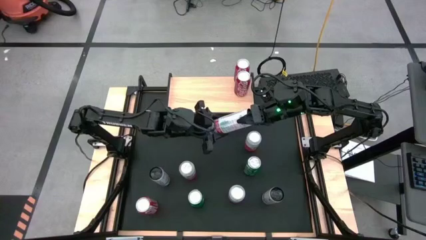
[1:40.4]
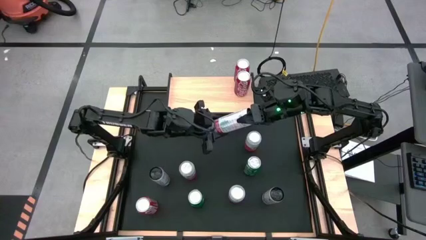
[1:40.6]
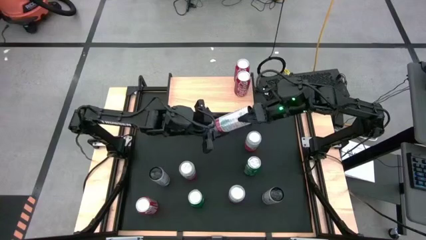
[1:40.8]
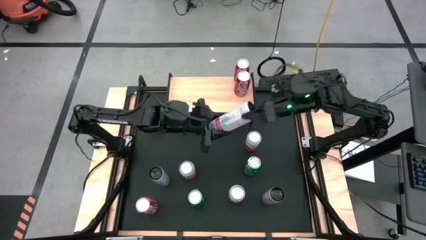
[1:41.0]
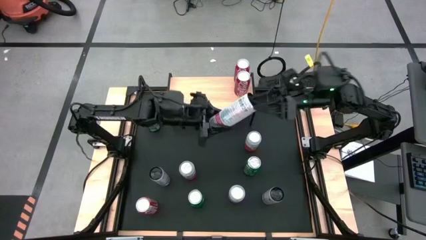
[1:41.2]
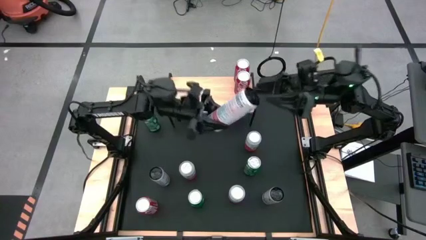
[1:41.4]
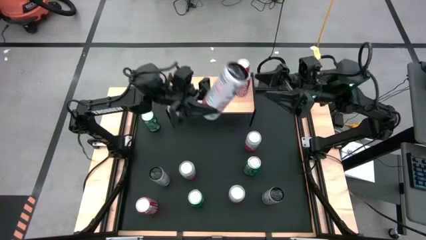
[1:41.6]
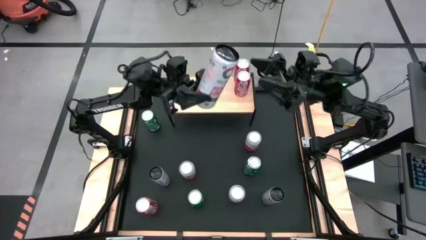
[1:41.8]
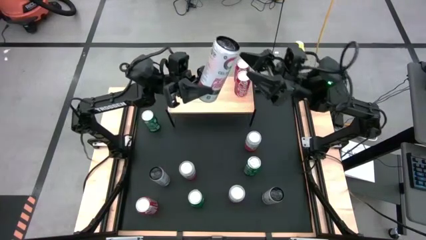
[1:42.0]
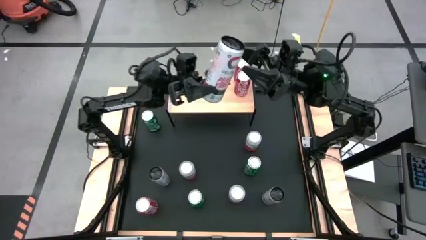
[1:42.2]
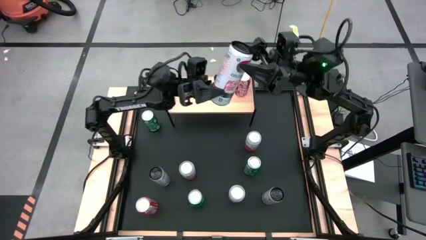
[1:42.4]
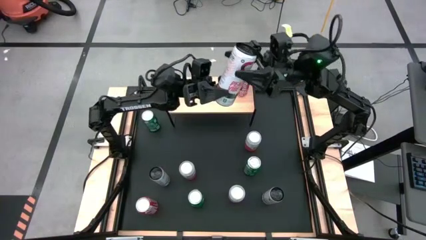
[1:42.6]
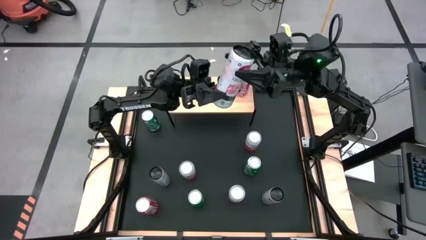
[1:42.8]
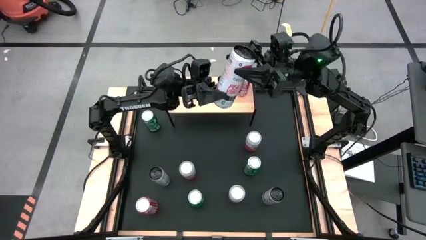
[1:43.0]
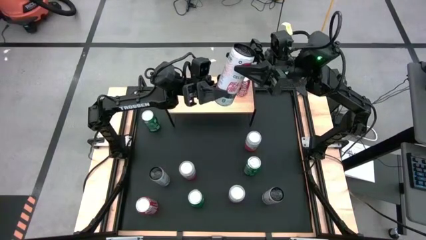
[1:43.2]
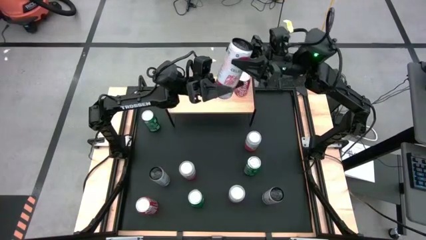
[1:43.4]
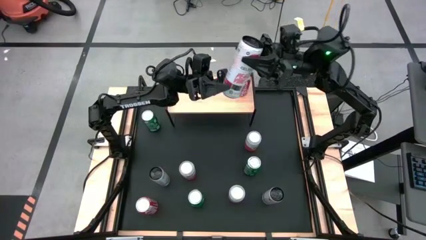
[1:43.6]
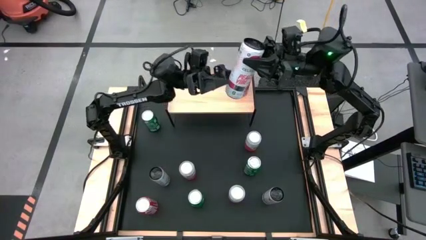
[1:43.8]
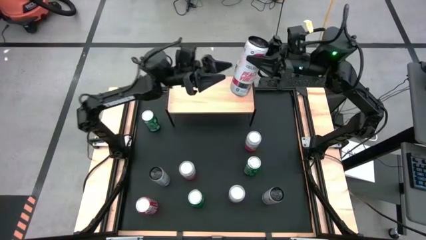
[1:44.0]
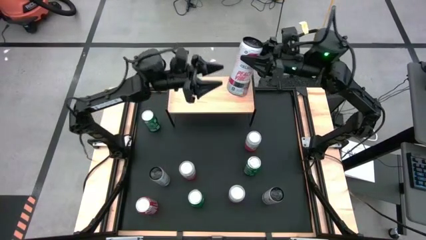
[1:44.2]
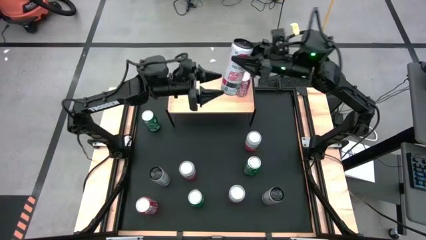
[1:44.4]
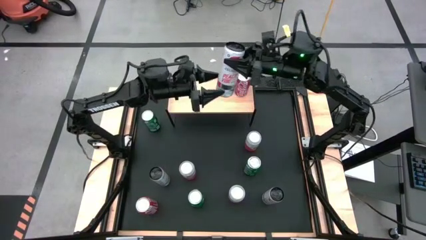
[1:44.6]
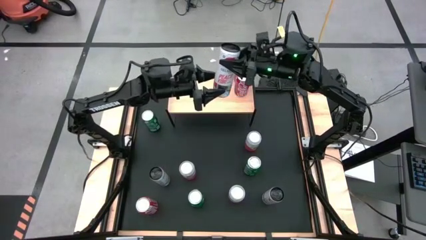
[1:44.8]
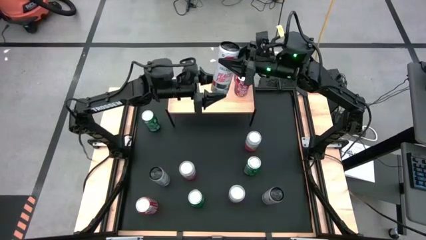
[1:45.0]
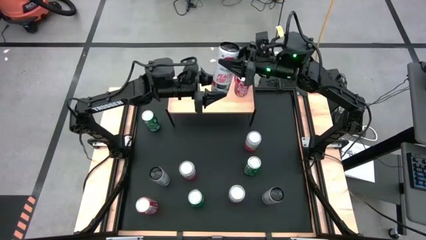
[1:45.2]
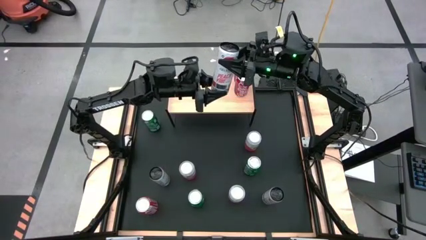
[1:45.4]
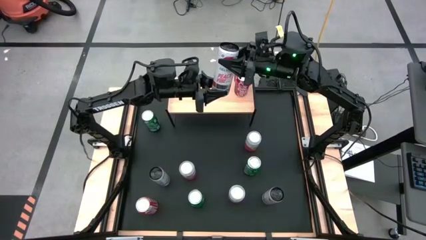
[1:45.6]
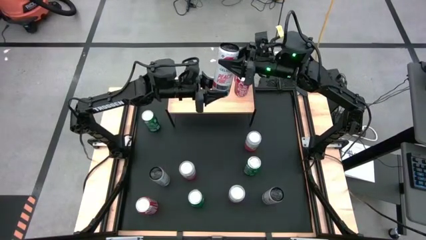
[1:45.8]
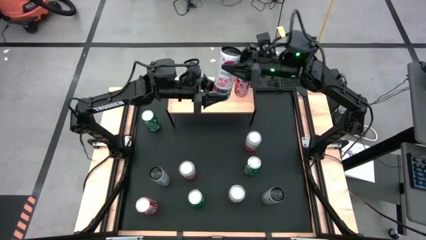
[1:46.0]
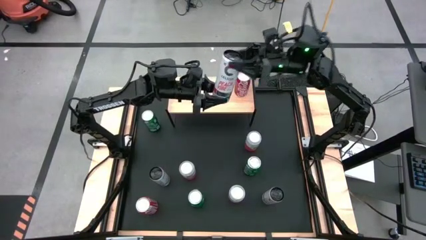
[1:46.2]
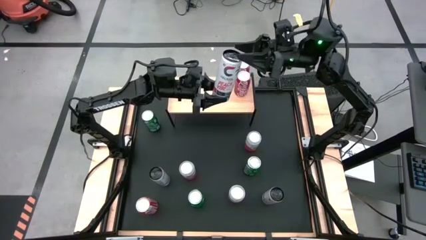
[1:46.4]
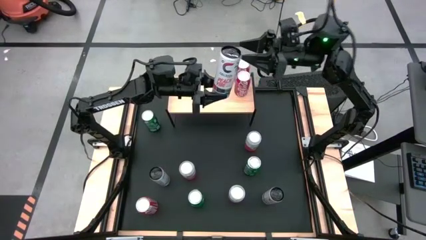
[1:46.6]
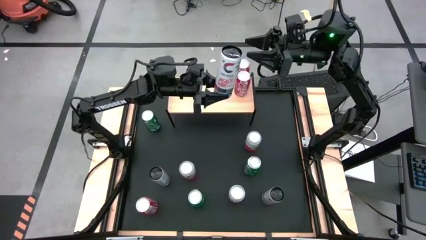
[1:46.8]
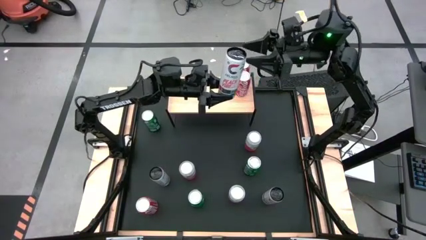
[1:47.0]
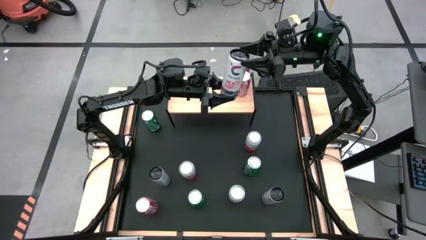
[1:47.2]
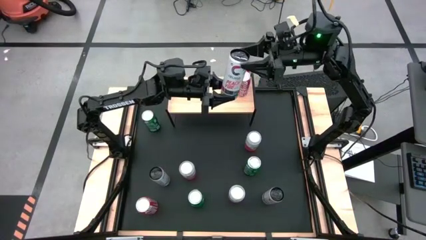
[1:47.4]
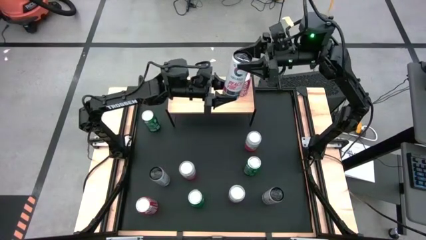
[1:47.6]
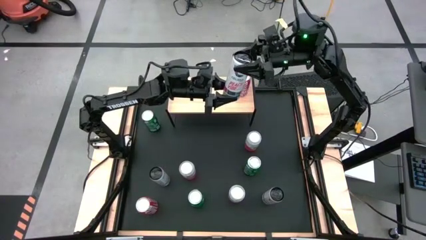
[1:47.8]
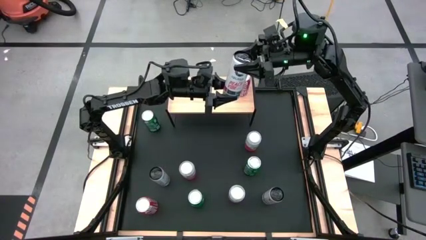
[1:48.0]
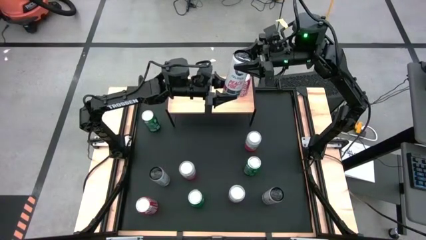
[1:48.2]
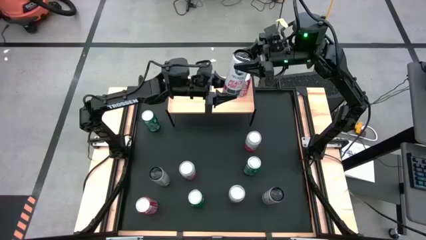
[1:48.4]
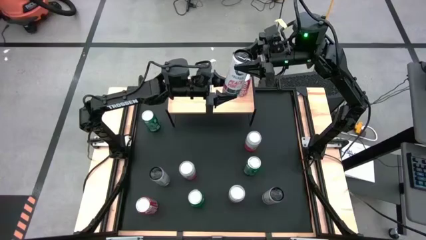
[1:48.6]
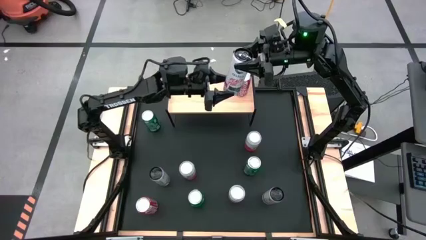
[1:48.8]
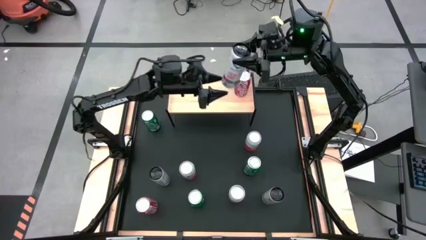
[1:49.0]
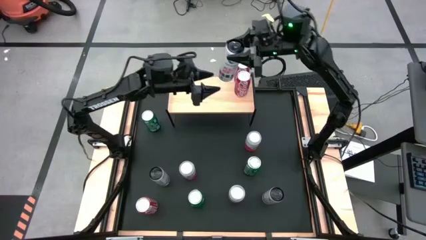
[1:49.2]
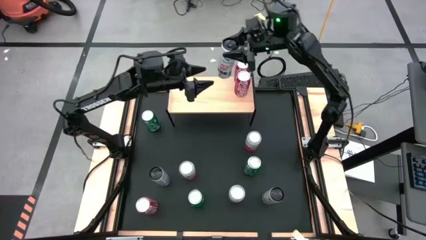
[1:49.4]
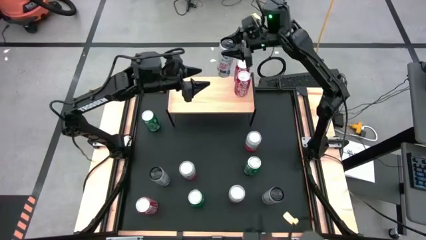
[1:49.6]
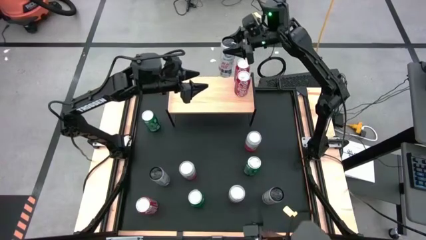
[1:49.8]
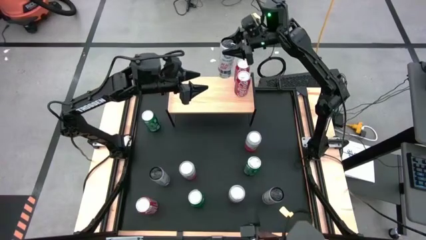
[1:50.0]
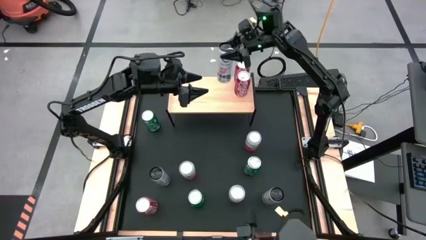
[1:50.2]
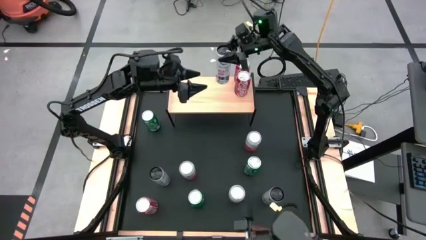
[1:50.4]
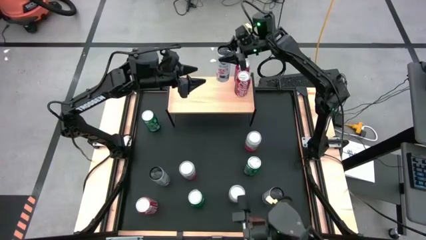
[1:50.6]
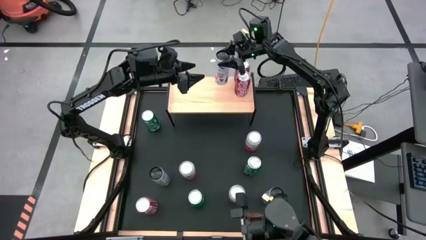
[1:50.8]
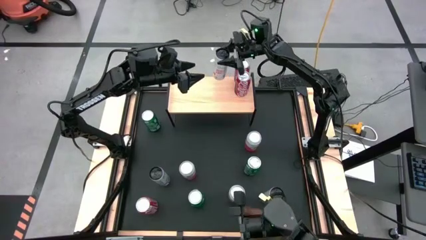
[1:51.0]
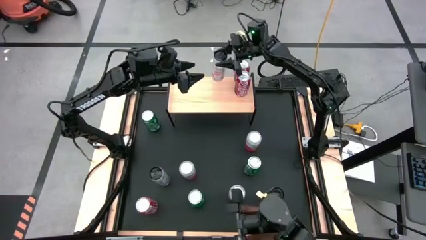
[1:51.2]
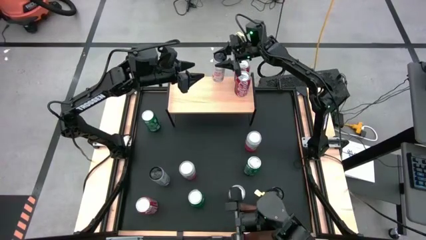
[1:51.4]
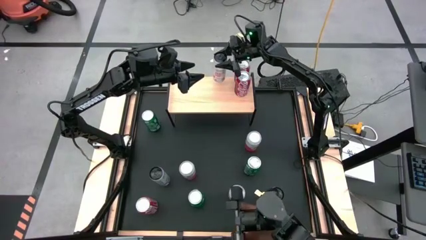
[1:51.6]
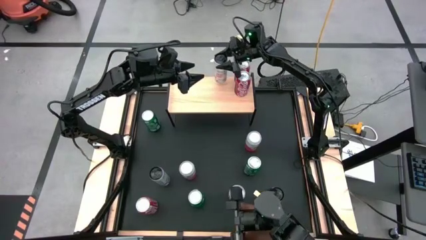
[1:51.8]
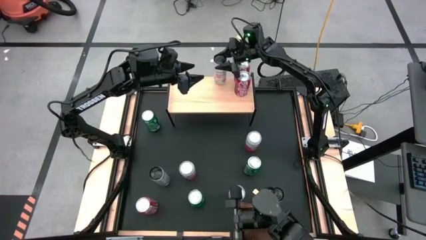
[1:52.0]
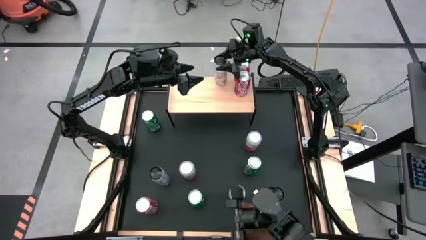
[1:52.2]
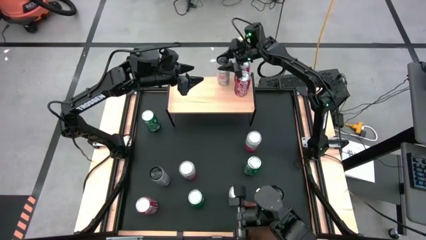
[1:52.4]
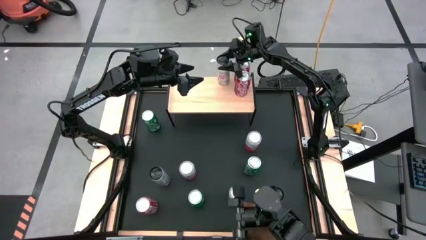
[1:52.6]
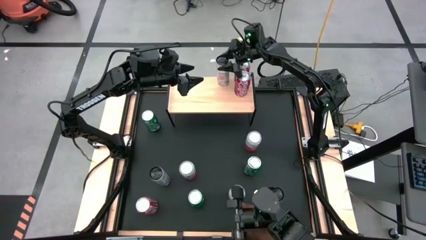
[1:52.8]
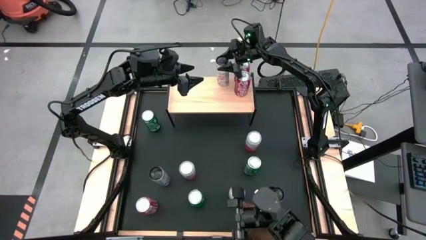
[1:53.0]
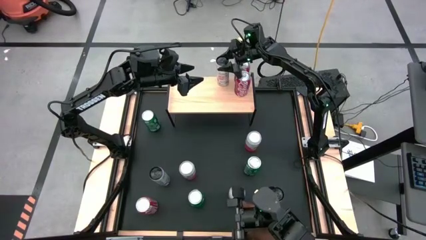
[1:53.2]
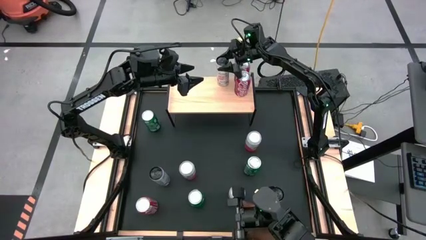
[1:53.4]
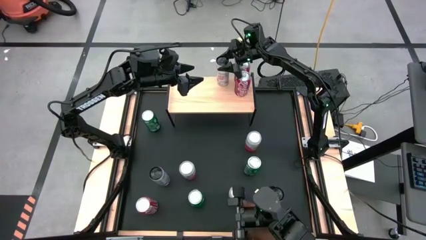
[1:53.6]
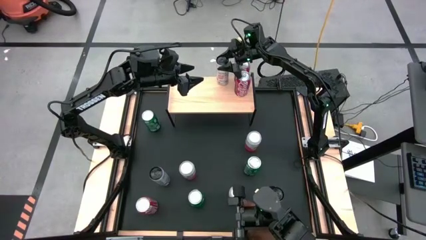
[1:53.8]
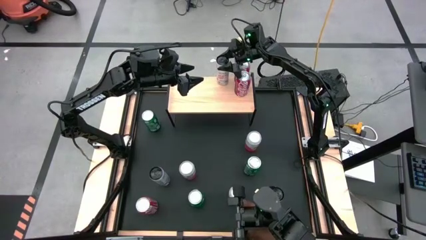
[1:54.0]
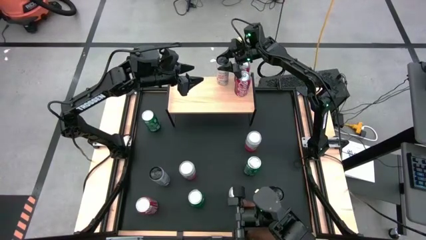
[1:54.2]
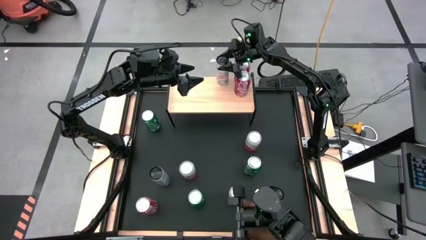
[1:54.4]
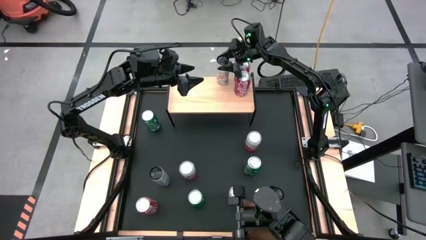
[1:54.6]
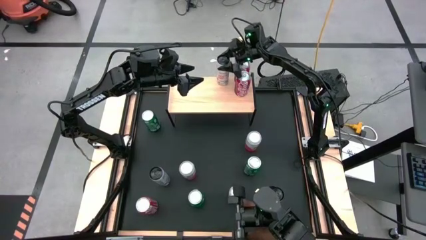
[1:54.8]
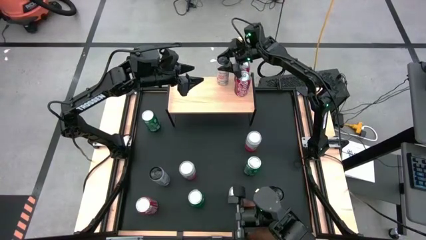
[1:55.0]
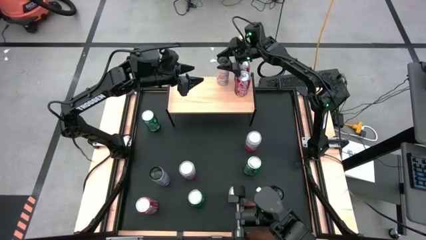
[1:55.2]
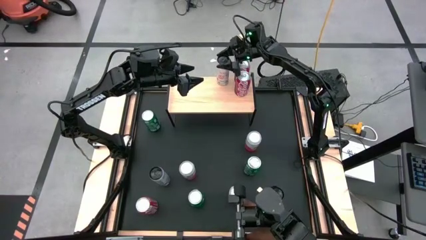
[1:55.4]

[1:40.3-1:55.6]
Task: Place canned beverage on shelf
Put the top white pink soda can on the shelf
